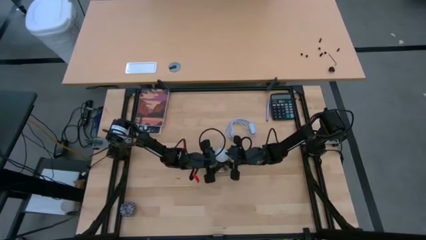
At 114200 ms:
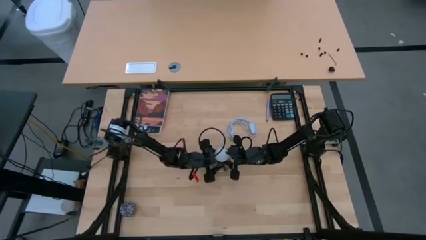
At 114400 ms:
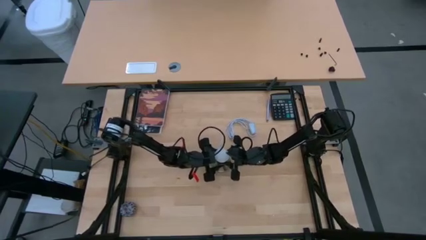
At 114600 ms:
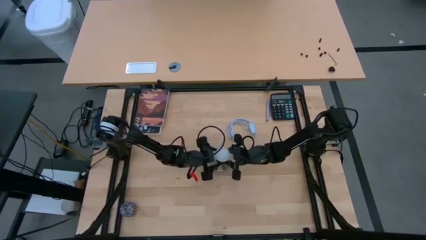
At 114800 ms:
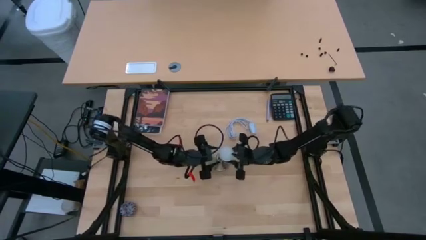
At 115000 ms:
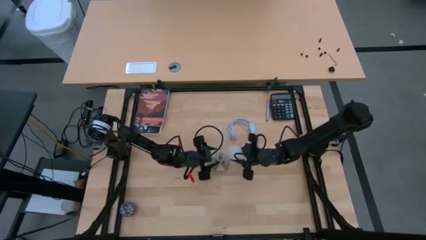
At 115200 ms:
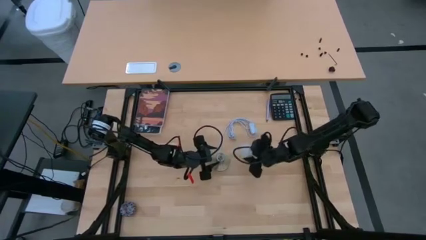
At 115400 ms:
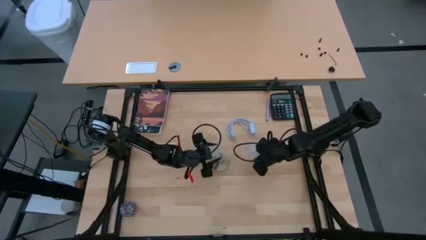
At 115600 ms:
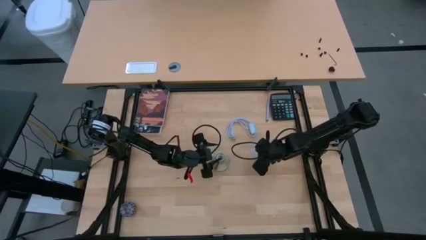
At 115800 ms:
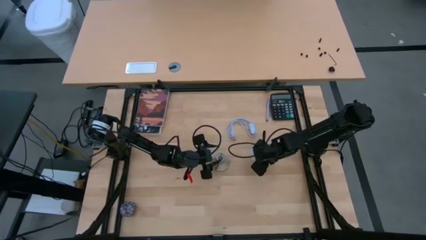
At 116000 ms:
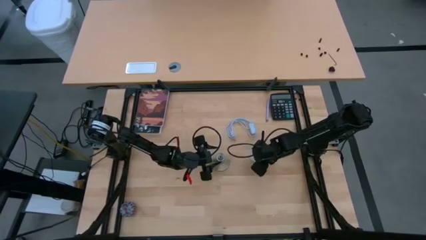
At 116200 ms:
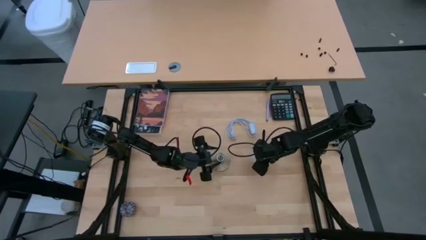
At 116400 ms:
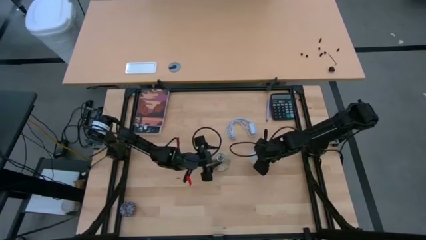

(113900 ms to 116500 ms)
Task: Screw lightbulb
Put the lightbulb on the table

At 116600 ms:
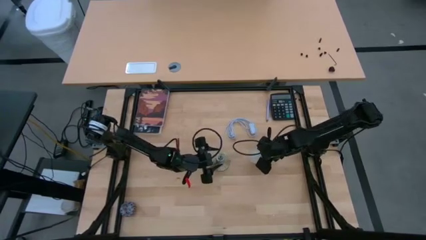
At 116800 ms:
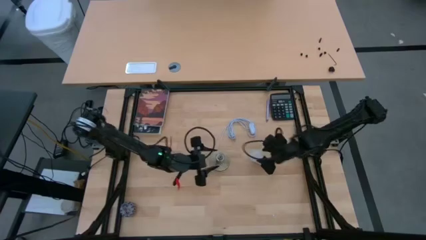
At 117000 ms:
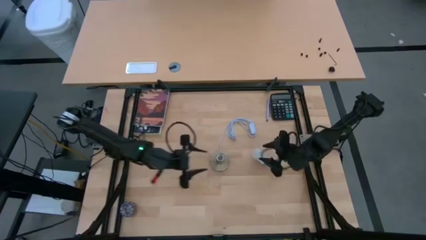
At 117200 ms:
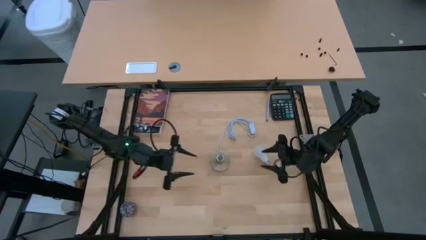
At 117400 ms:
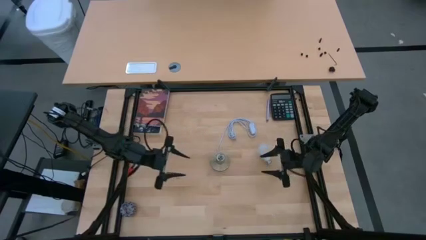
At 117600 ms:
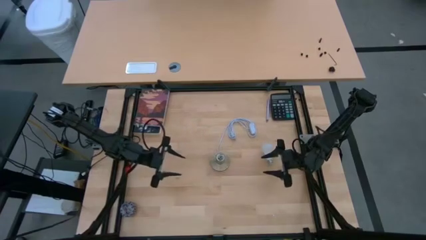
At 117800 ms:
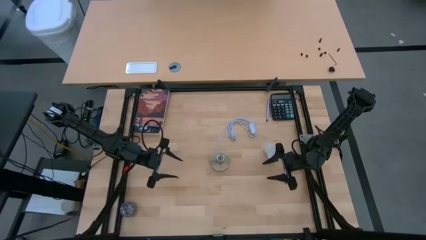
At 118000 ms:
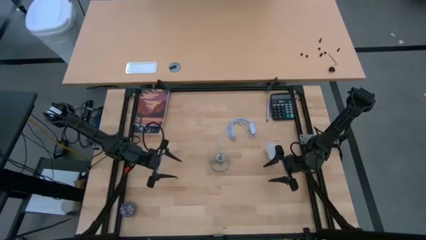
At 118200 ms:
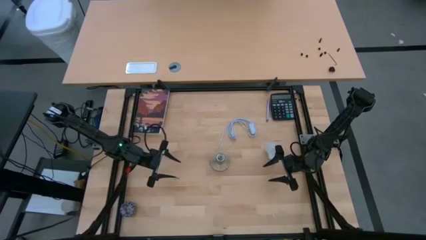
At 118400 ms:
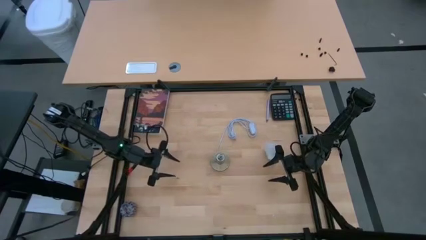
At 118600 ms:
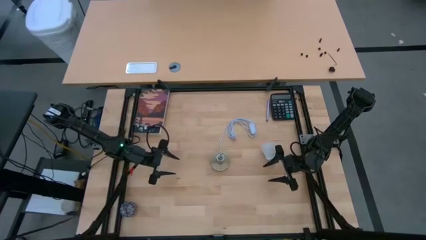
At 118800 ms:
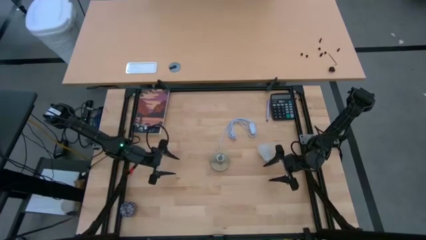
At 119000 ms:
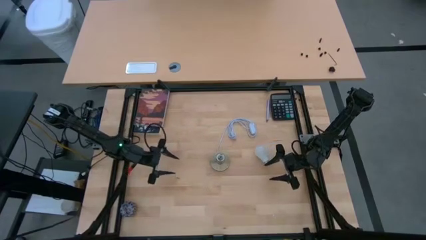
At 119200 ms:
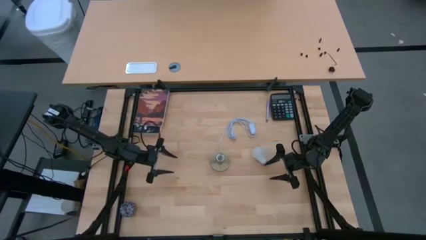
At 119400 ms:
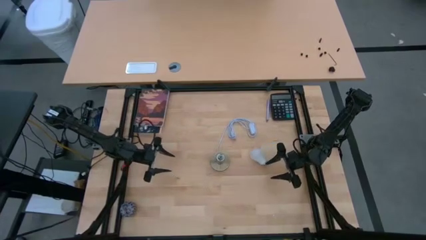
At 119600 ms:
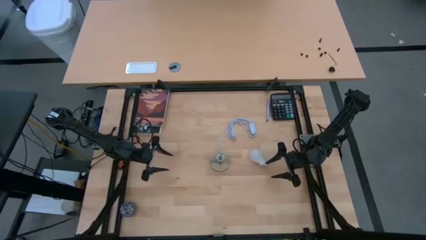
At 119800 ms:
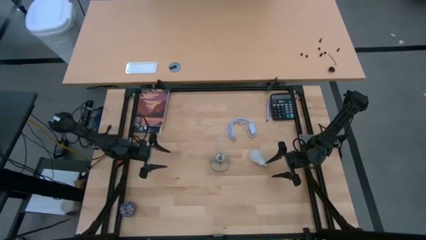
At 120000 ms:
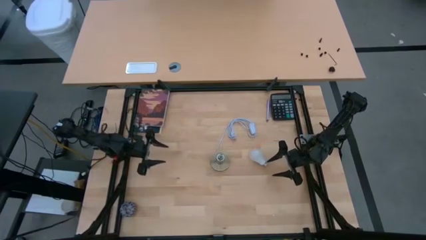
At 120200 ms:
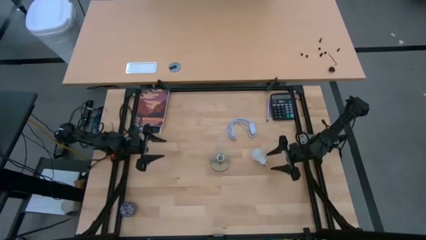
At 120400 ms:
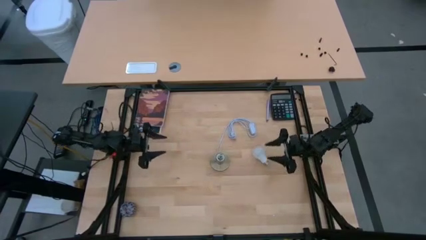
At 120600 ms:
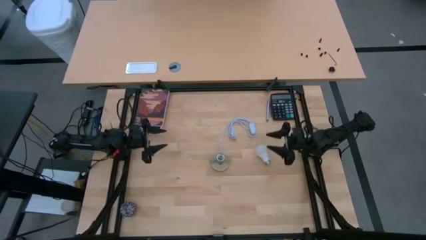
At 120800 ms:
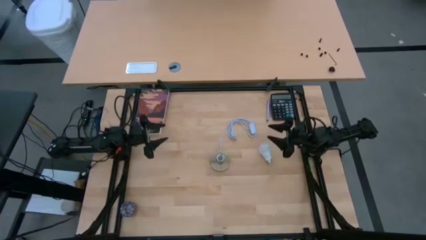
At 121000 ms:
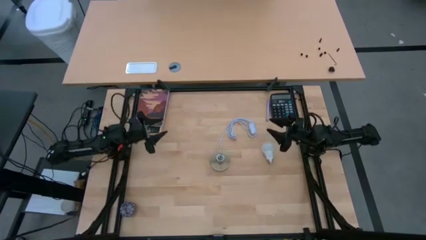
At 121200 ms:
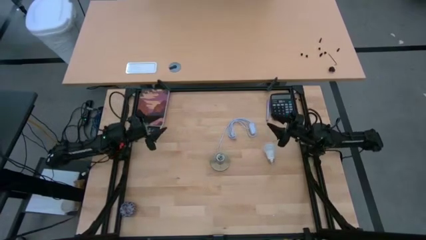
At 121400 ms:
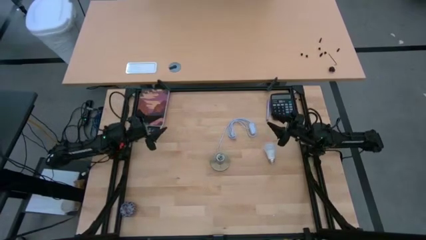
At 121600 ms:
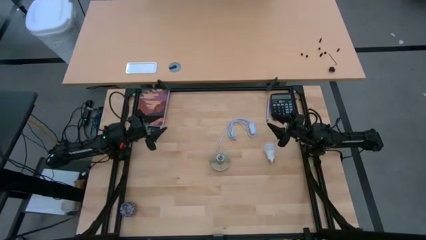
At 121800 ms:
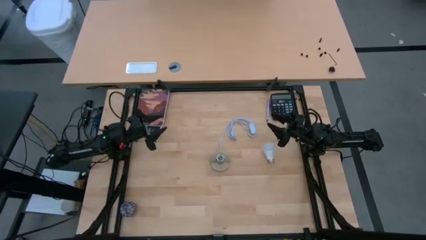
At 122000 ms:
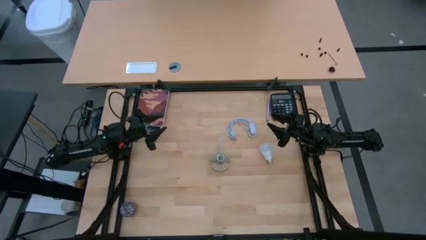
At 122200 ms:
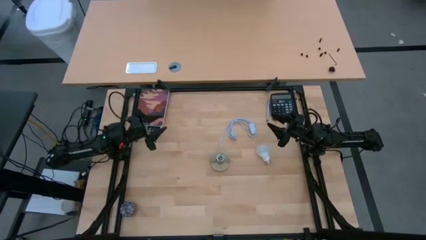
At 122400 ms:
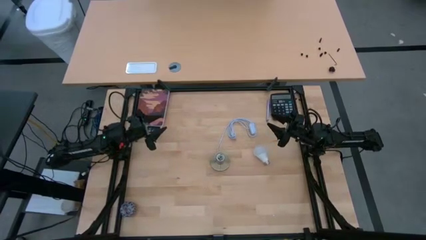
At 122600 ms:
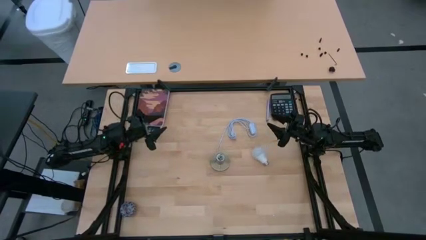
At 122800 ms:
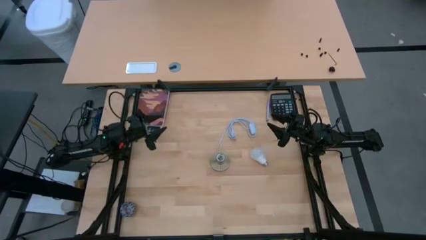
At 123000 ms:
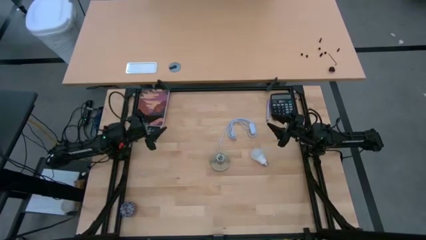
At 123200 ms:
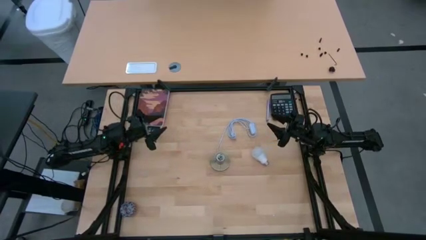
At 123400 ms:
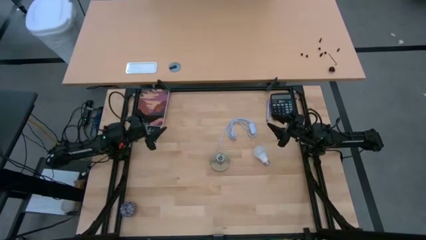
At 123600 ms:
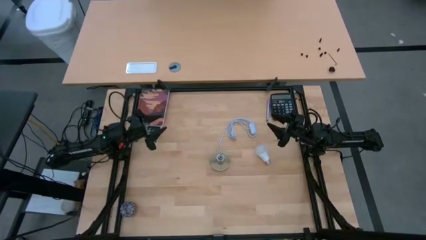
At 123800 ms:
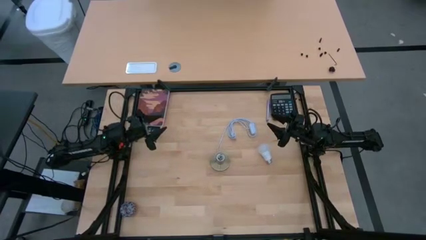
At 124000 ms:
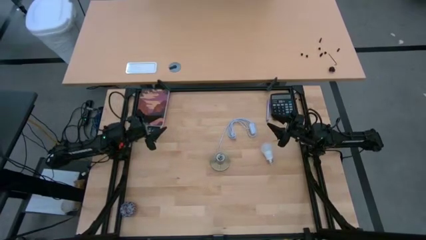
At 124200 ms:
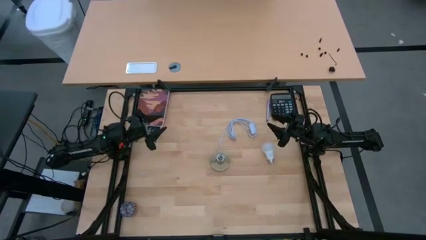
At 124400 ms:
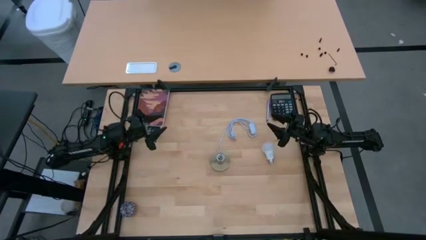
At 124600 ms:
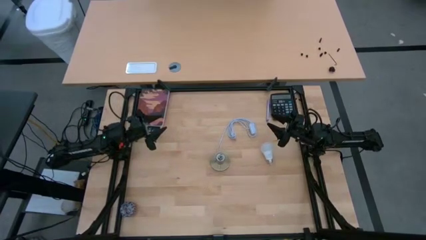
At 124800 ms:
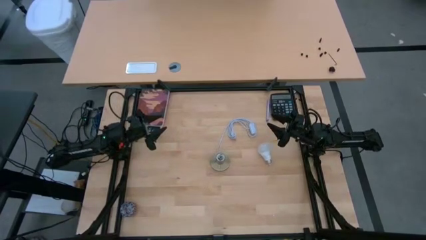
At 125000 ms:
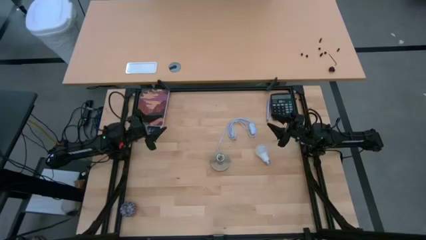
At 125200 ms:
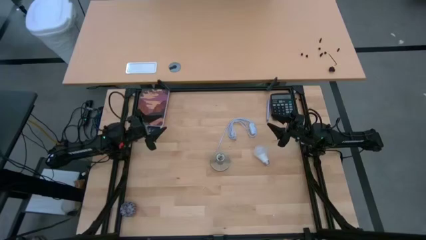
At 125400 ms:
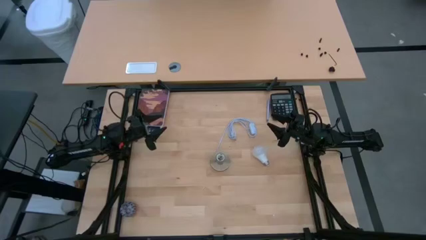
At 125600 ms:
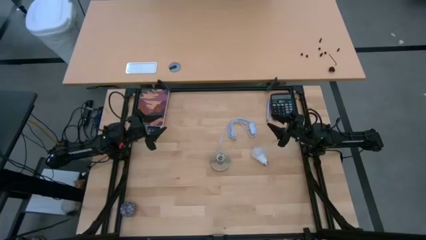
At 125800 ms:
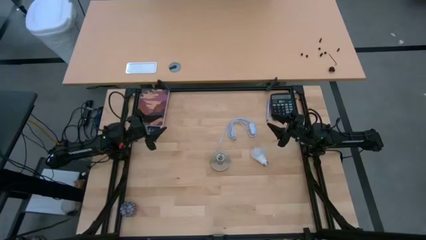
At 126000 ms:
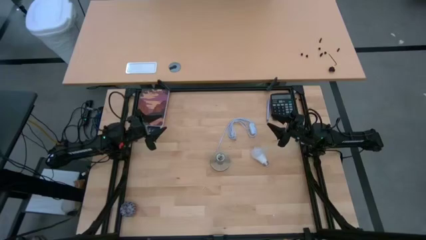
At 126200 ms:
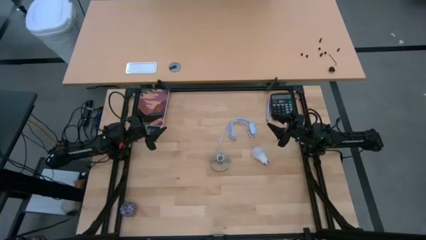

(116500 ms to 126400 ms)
Return to Home Position

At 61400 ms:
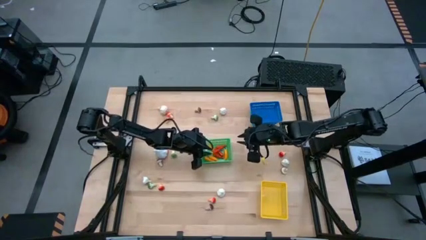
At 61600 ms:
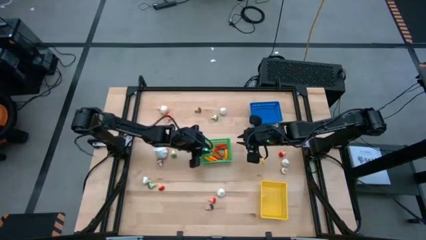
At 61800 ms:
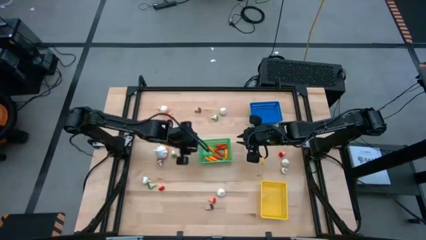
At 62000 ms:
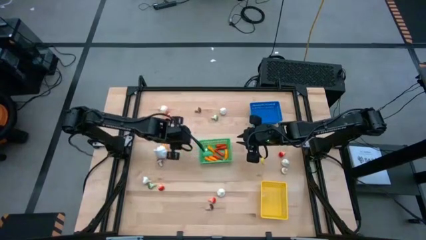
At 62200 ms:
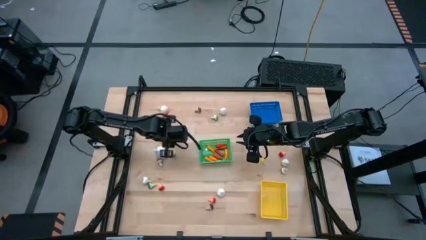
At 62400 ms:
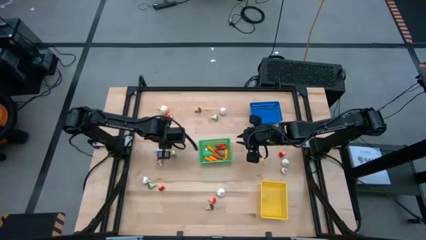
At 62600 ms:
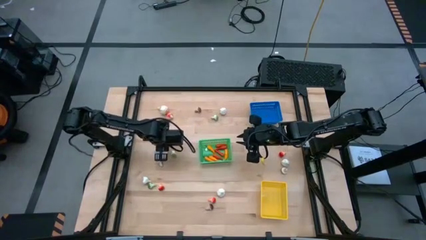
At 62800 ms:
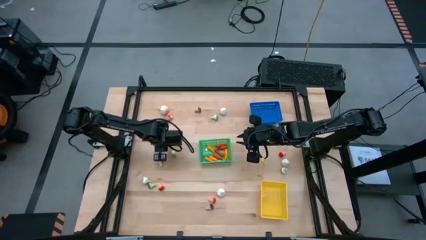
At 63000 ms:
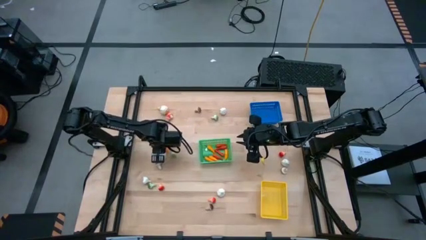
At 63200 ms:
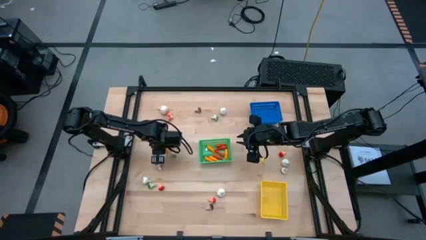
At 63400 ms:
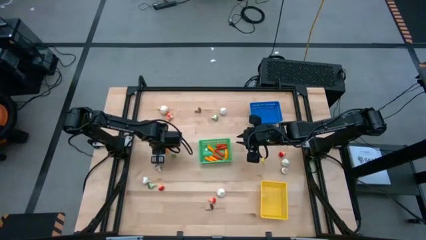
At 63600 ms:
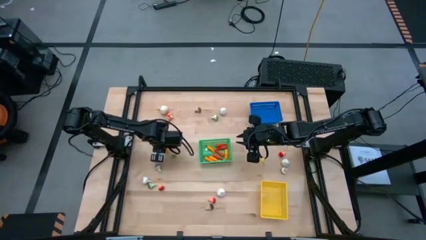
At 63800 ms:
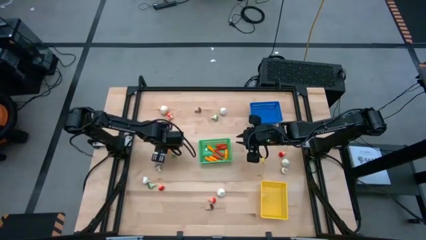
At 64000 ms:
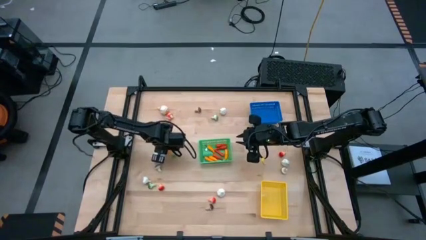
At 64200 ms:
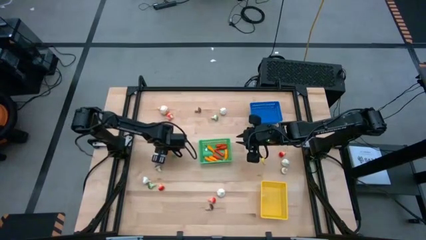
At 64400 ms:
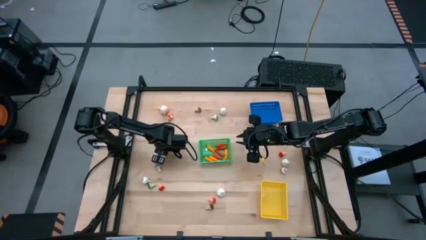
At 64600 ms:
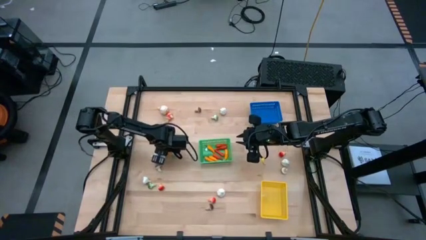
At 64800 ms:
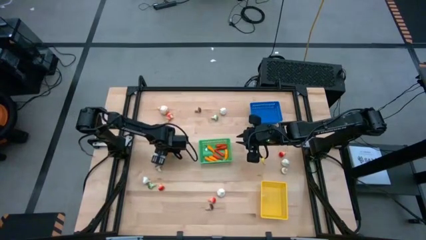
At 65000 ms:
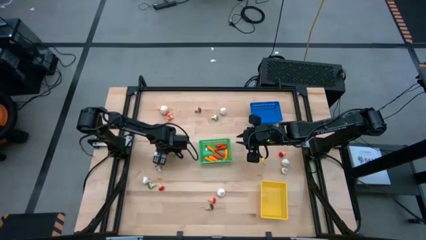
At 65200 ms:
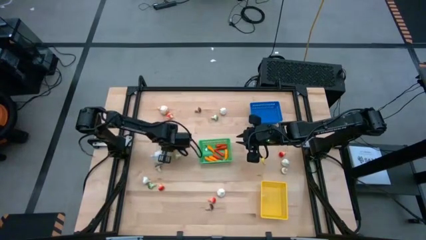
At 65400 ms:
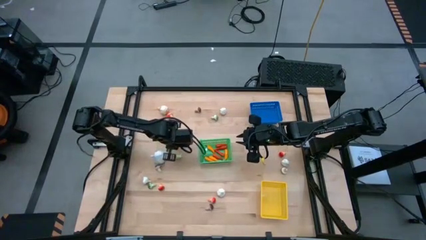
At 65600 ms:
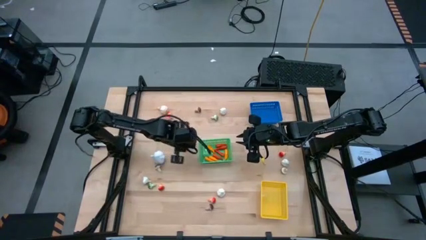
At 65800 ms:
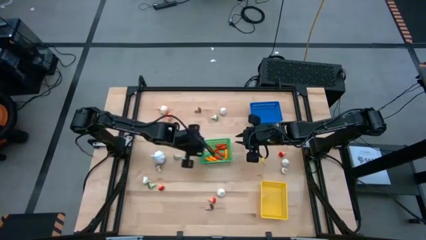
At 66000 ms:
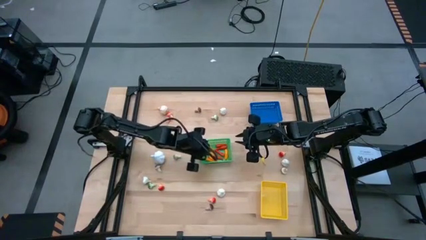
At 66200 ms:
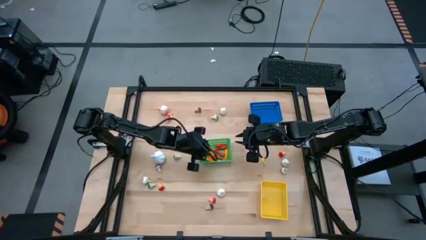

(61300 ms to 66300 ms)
Task: Sort produce into baskets
Put the yellow chili pepper into the green bin
